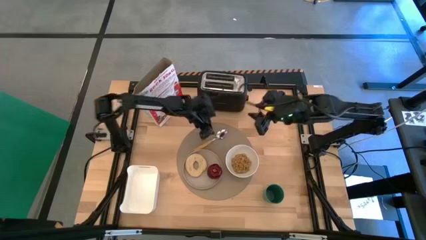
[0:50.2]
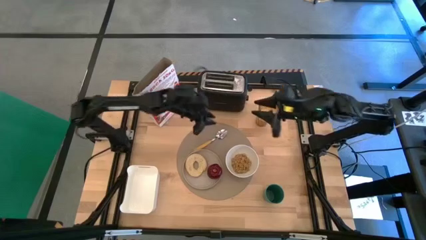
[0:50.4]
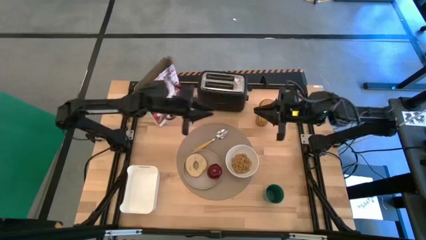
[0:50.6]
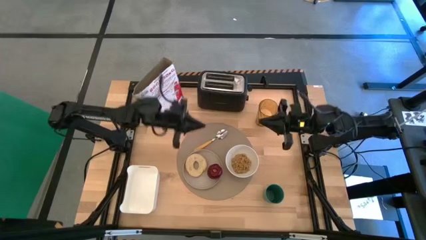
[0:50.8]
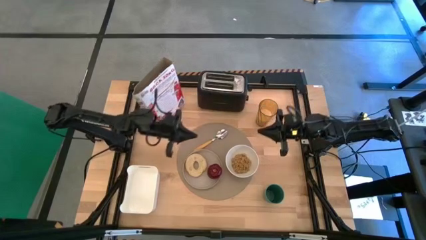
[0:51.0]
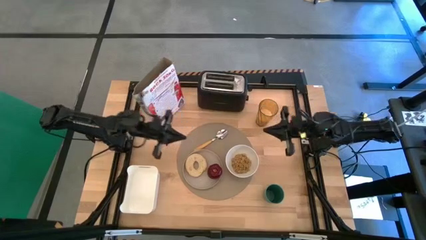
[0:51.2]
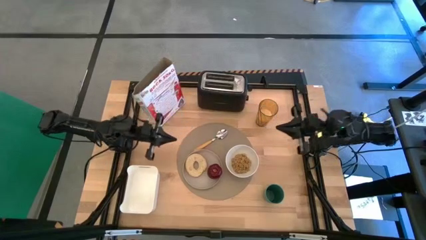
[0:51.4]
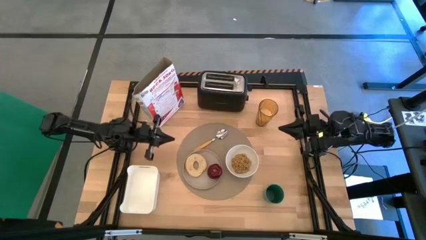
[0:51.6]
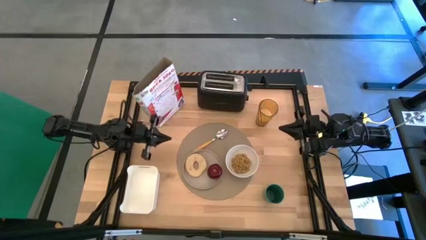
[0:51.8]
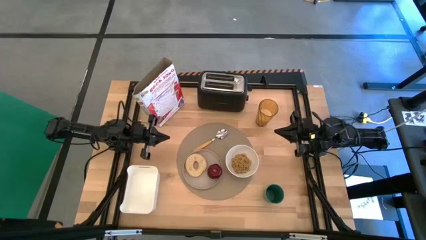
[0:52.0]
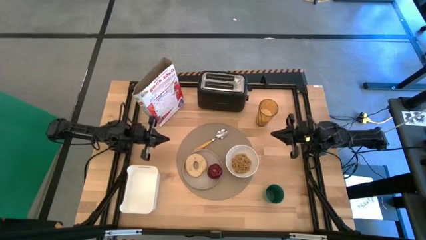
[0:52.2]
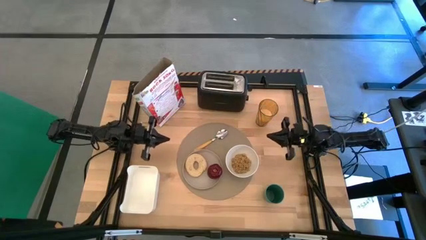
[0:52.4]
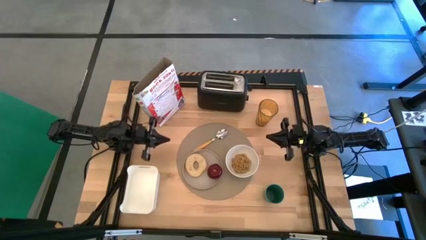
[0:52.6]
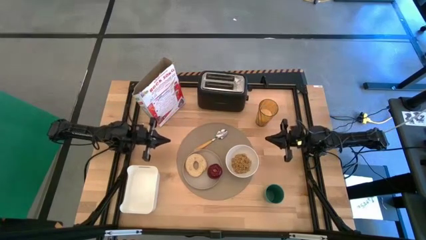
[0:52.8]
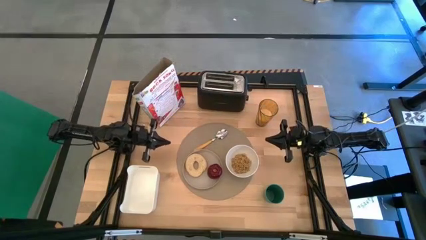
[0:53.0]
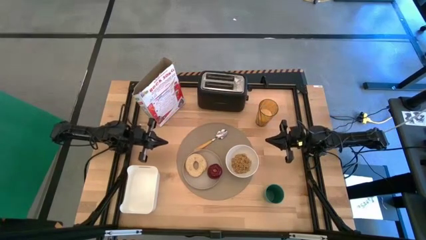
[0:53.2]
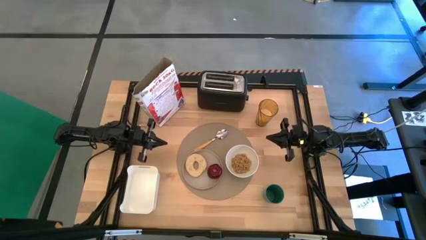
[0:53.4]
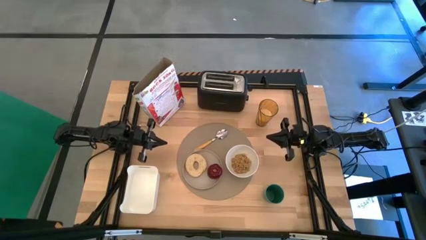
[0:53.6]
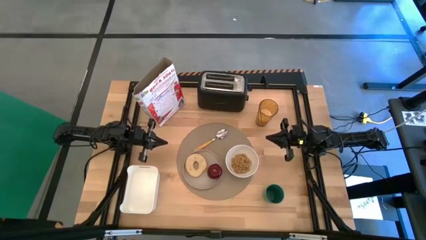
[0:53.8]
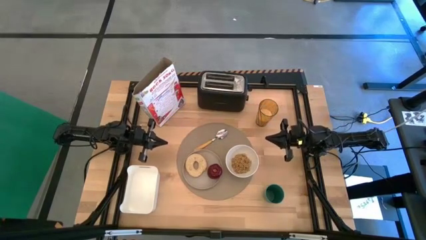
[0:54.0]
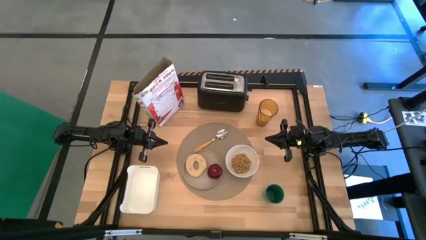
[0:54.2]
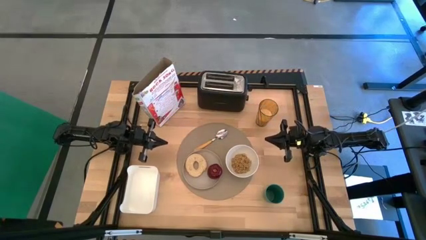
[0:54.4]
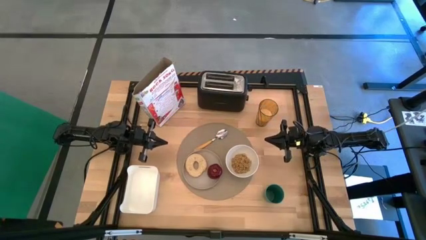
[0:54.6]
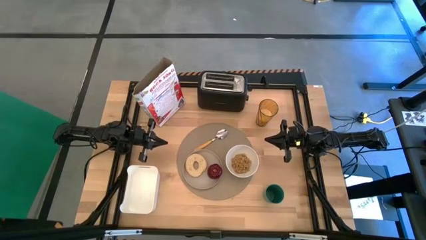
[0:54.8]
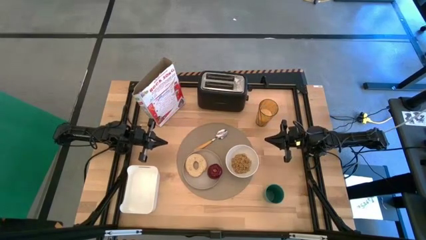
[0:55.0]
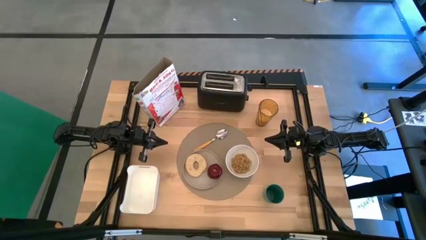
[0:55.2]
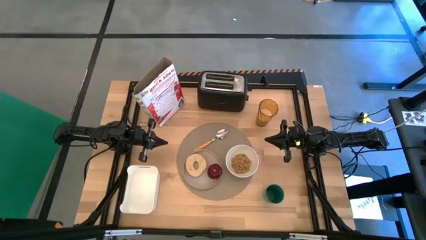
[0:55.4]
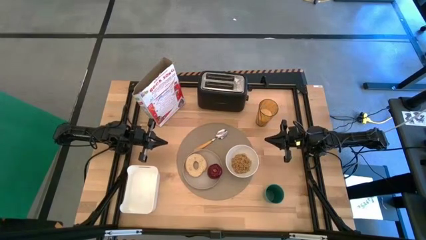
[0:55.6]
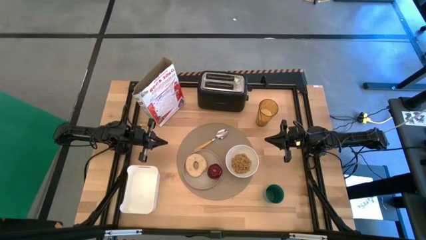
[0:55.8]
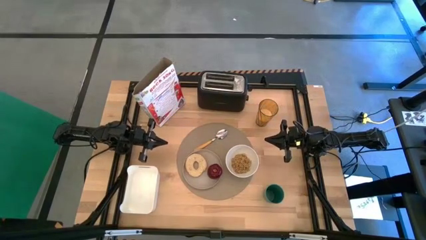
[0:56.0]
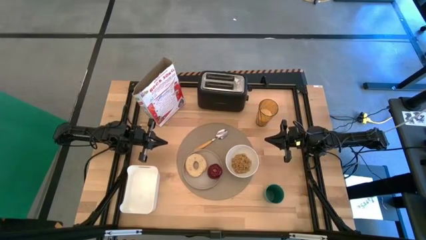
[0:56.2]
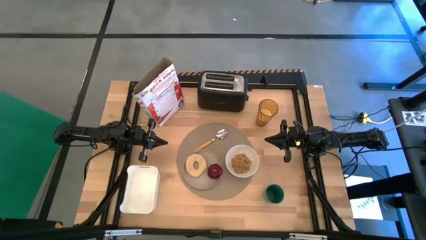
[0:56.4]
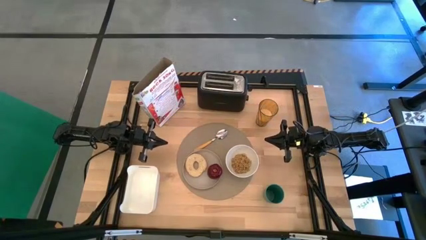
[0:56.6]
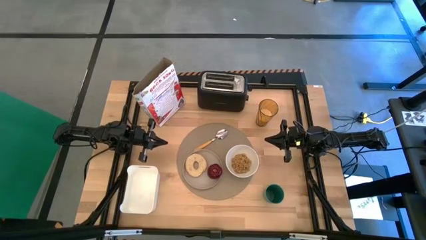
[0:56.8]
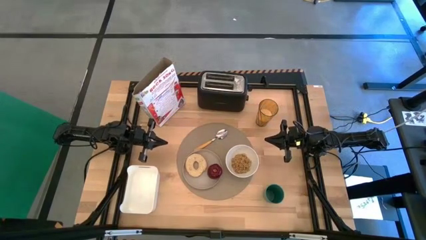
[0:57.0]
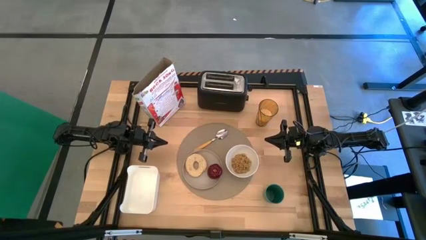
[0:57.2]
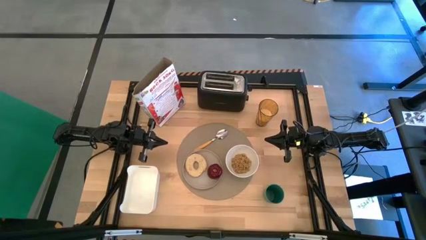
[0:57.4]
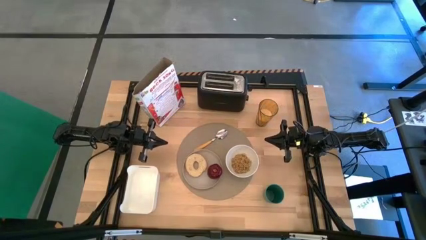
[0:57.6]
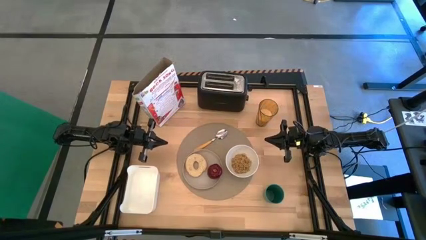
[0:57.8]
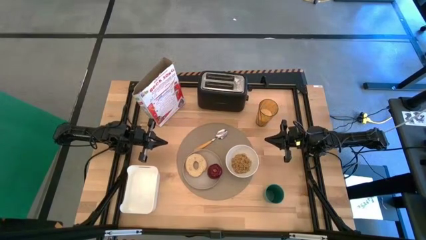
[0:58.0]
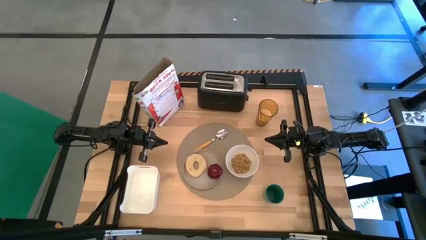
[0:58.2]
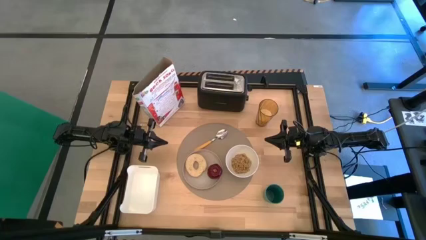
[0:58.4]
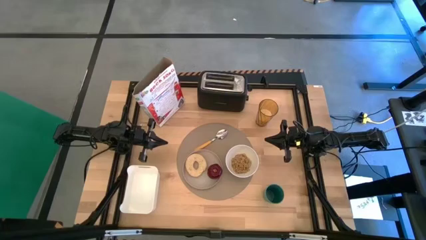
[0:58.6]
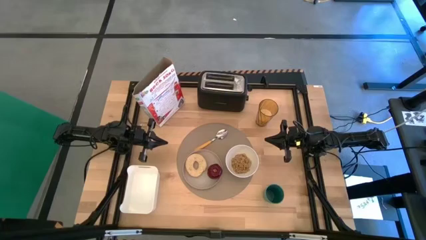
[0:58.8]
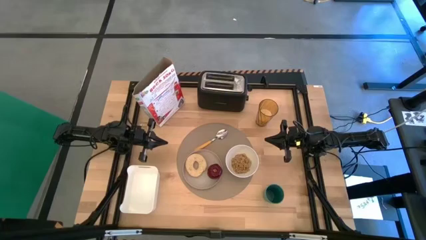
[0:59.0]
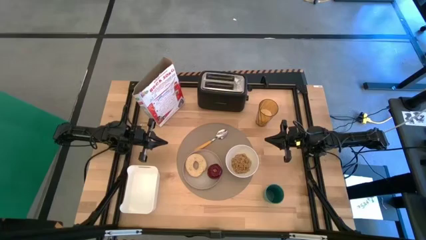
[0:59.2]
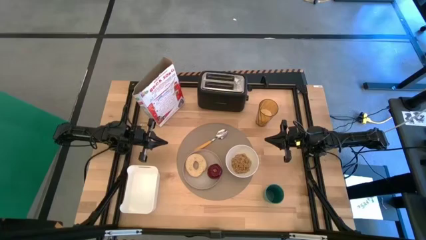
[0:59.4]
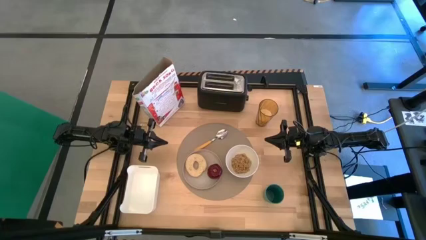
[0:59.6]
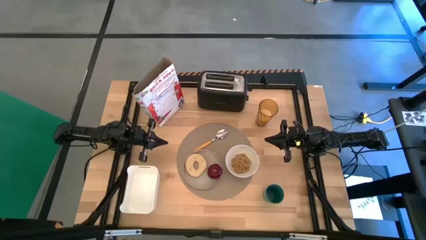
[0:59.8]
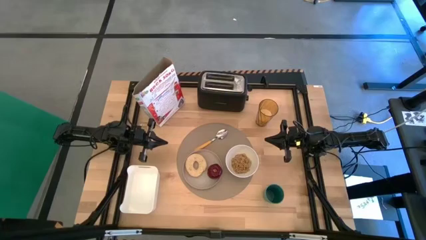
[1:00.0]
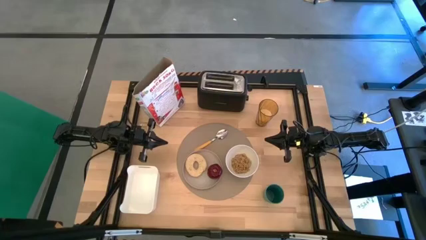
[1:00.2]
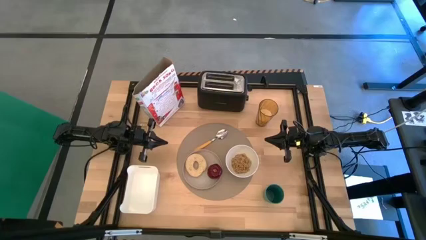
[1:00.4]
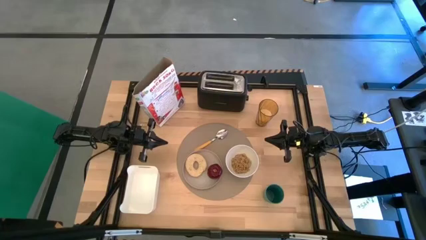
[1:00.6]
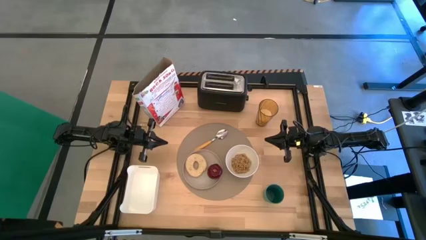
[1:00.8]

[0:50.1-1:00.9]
Task: Arrange a breakfast setting
Return to Home Position
